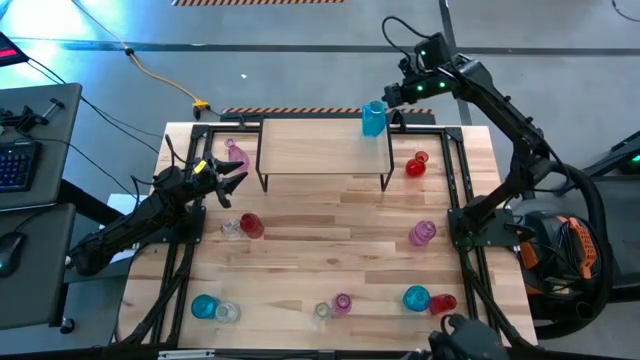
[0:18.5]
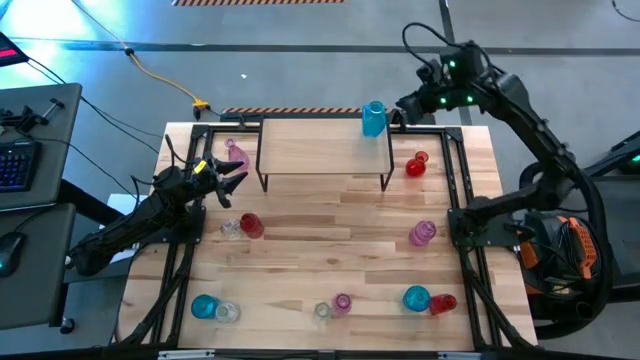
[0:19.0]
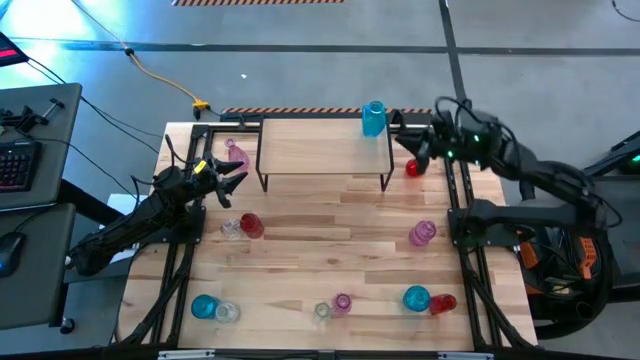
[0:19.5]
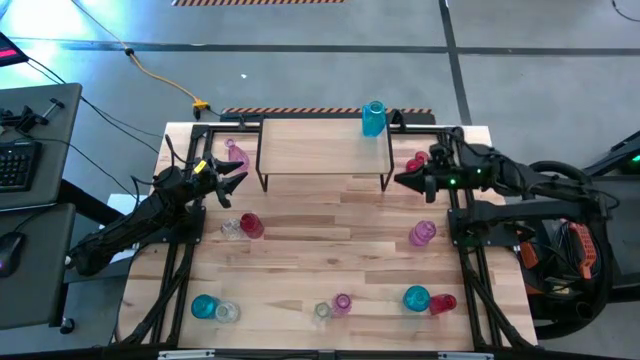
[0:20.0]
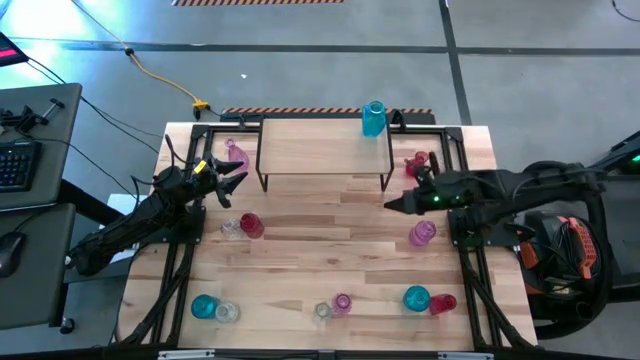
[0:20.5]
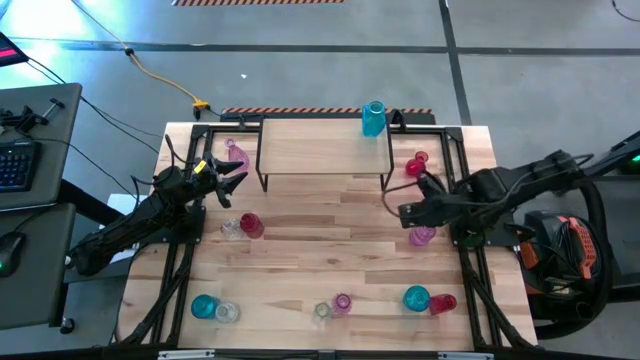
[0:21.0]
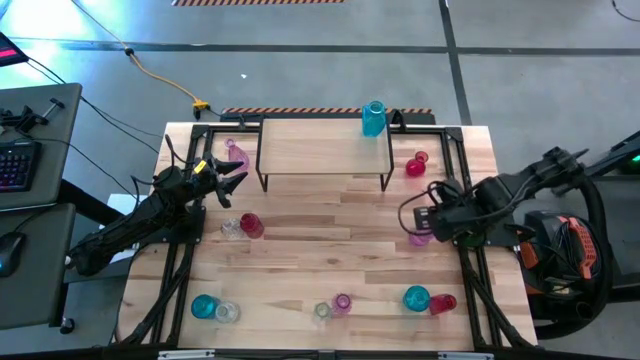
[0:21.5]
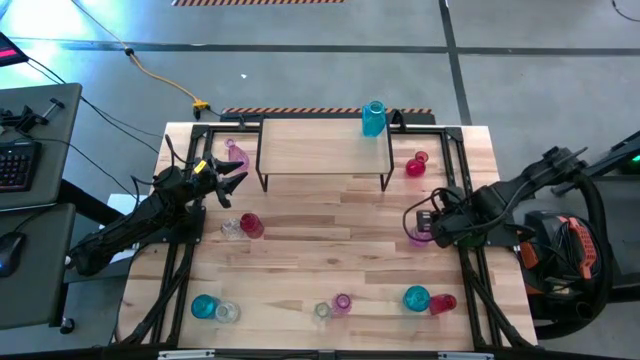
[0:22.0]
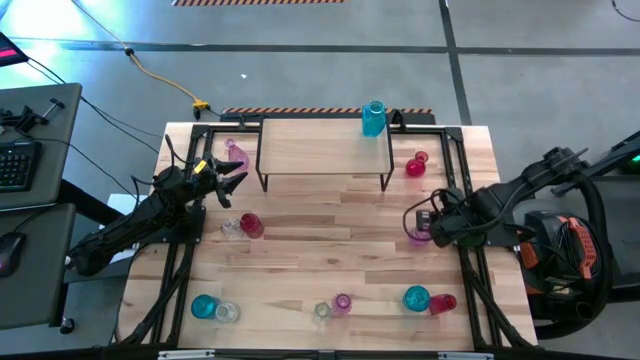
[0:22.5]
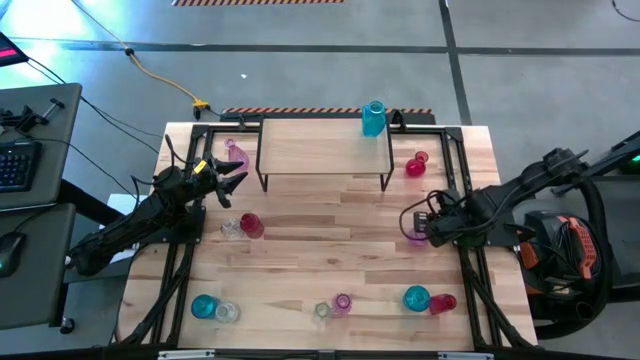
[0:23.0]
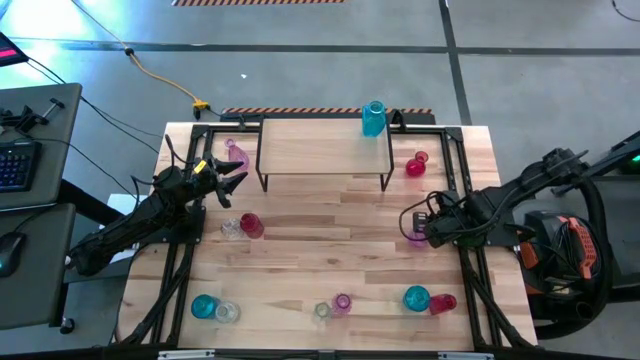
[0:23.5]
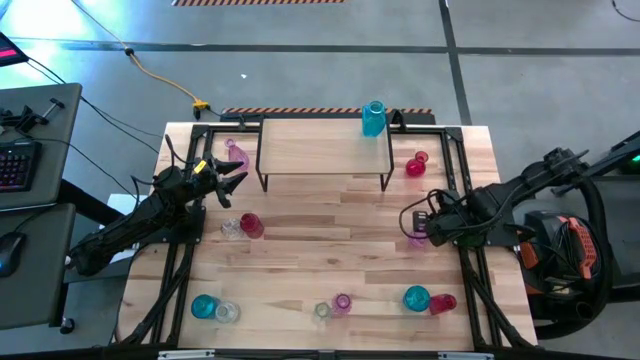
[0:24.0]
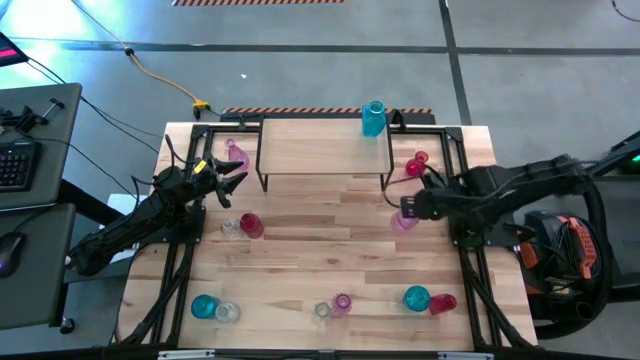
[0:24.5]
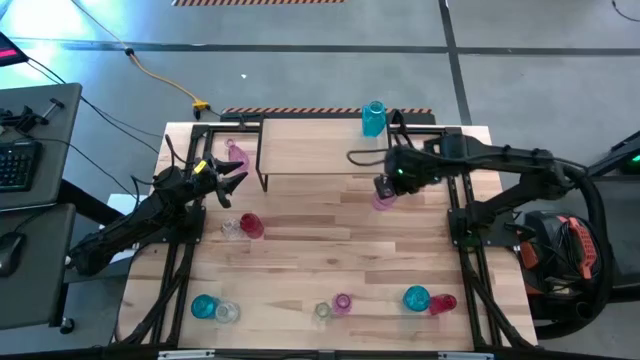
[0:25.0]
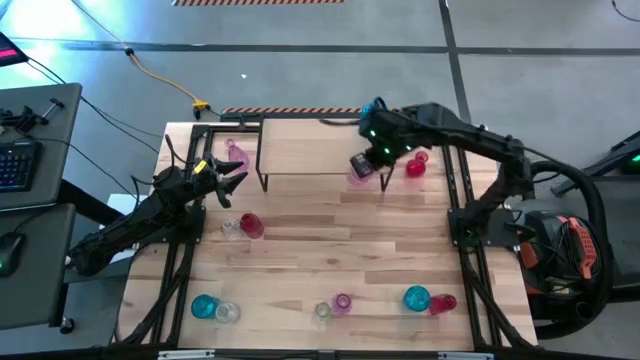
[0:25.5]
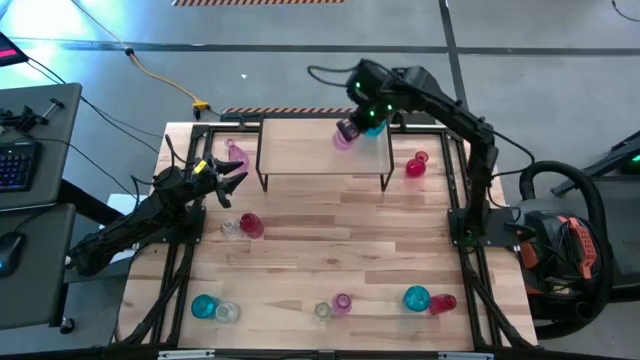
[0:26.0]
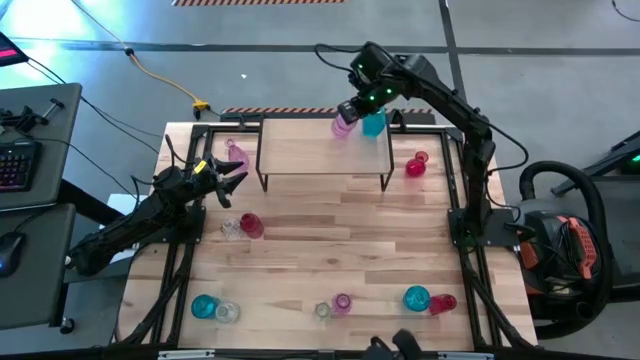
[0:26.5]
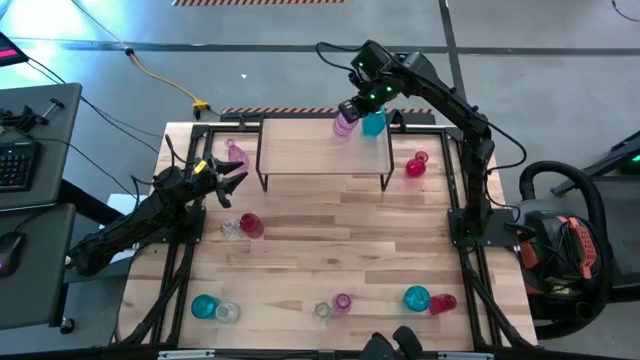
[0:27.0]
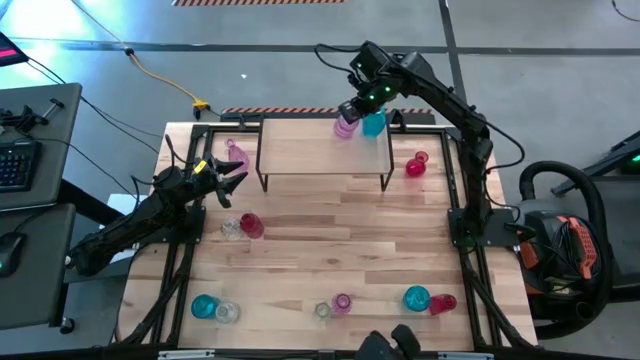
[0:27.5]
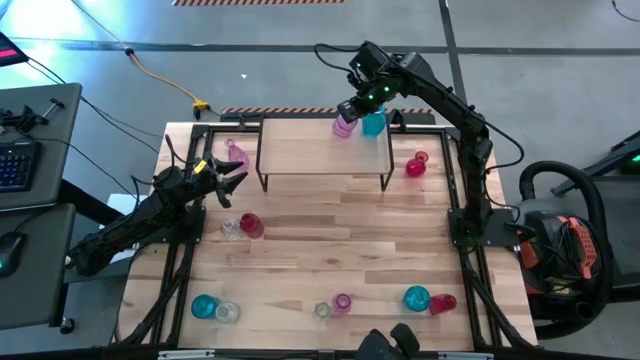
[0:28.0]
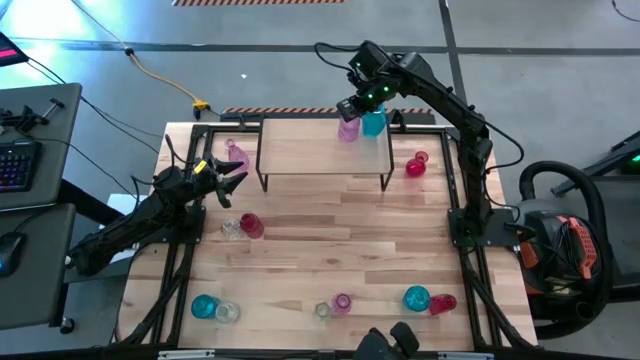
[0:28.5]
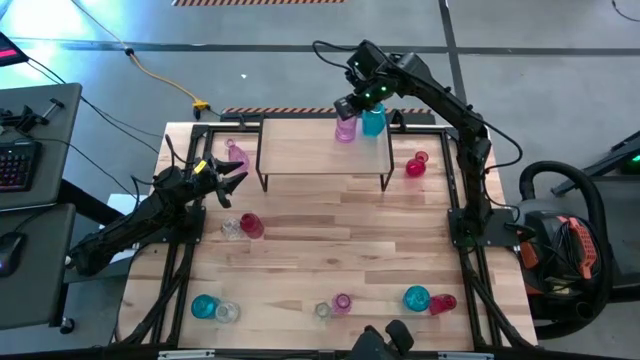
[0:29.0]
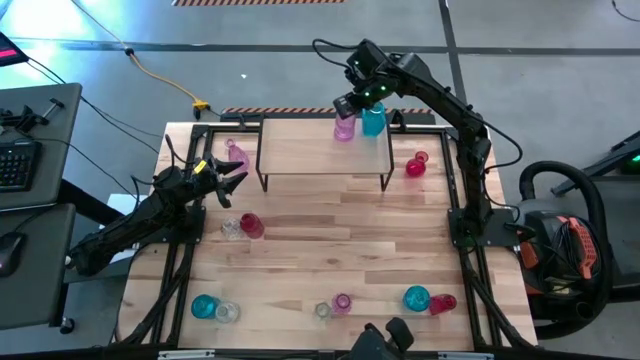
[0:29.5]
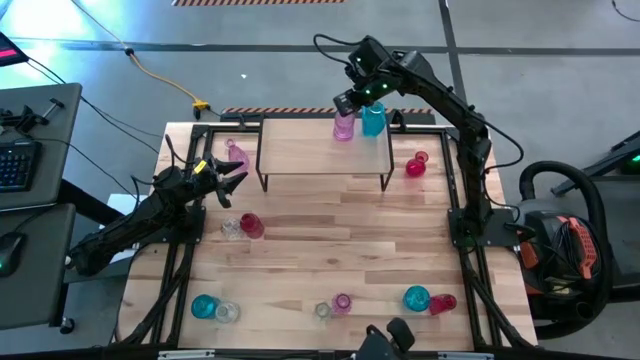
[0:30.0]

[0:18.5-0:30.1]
Task: sort vases onto shelf
Put the middle violet vase on the shelf

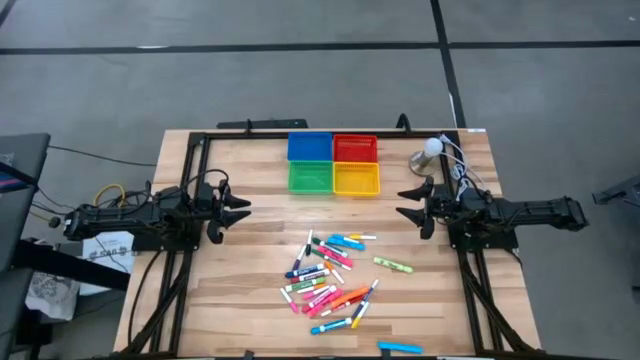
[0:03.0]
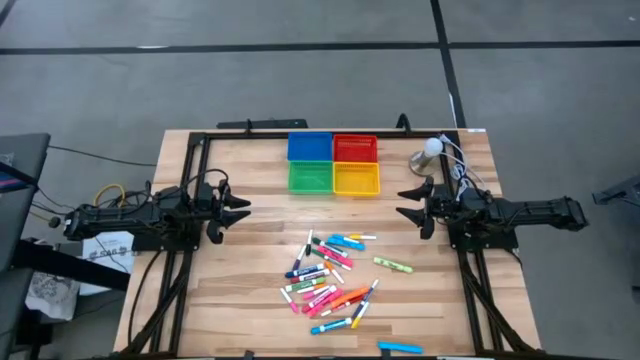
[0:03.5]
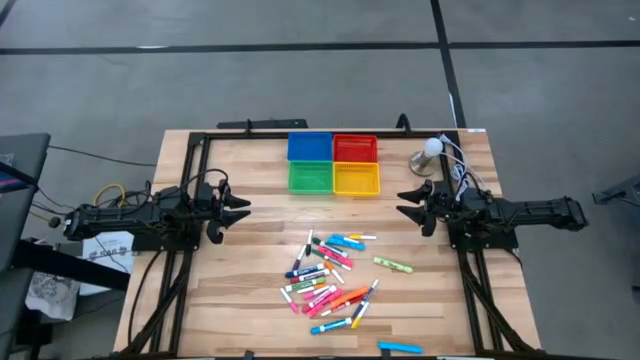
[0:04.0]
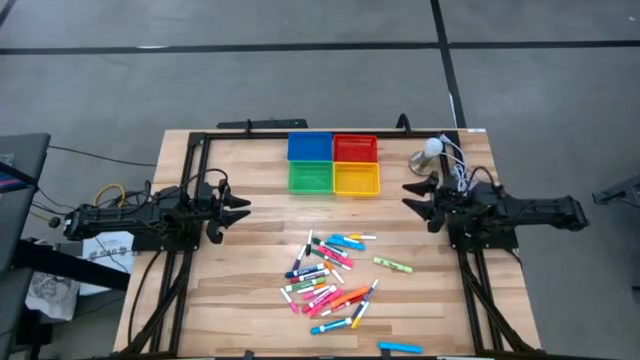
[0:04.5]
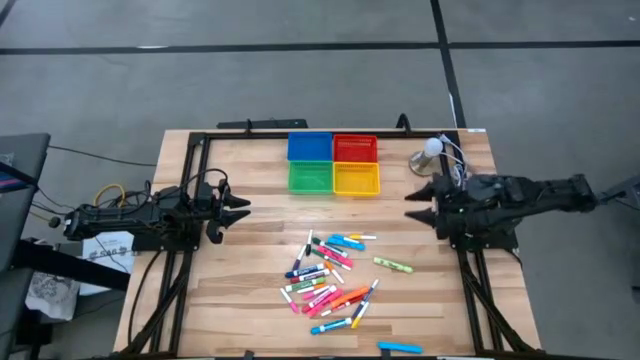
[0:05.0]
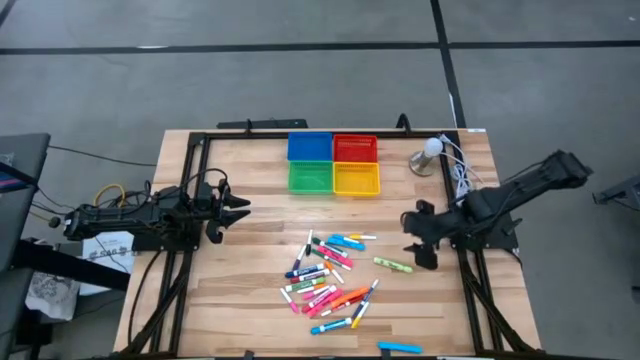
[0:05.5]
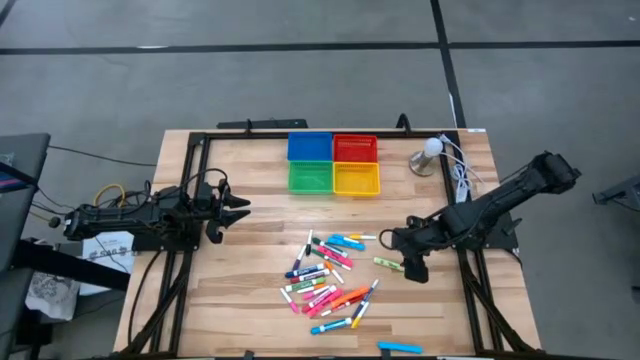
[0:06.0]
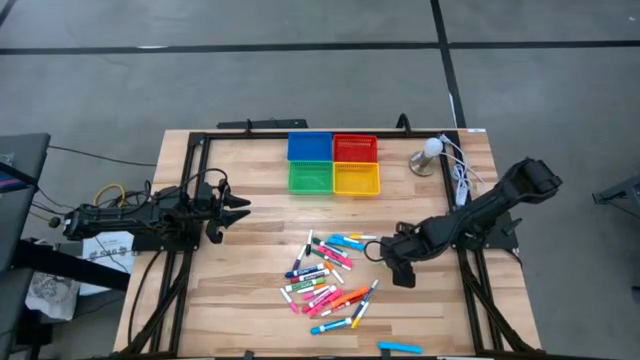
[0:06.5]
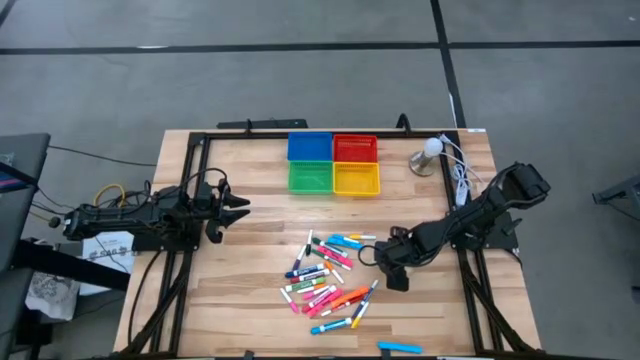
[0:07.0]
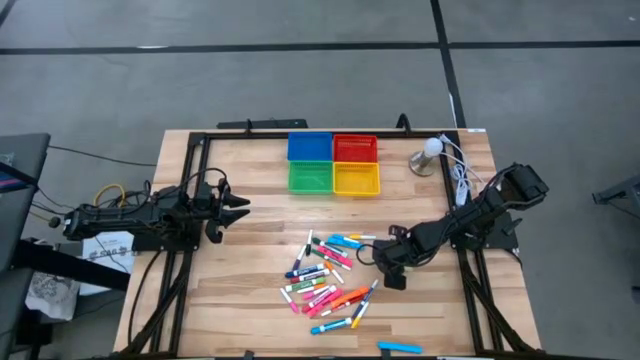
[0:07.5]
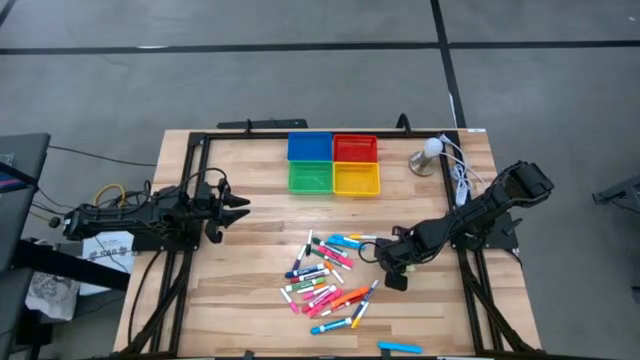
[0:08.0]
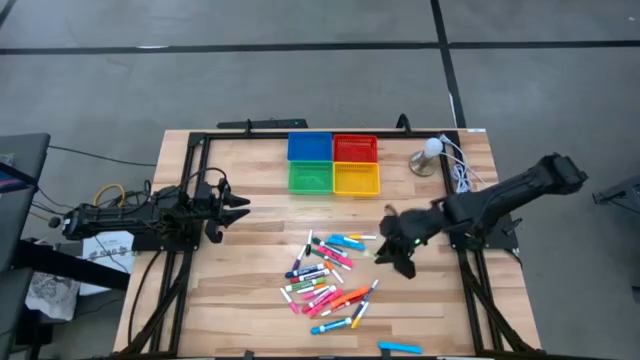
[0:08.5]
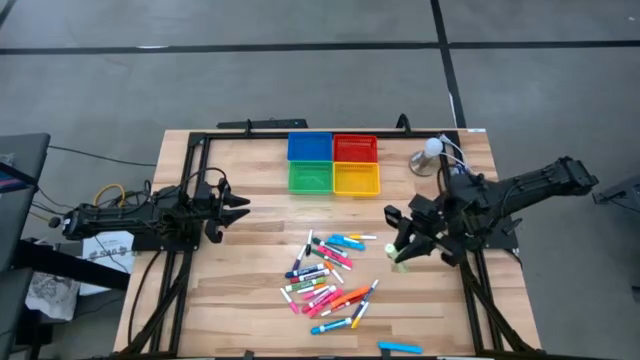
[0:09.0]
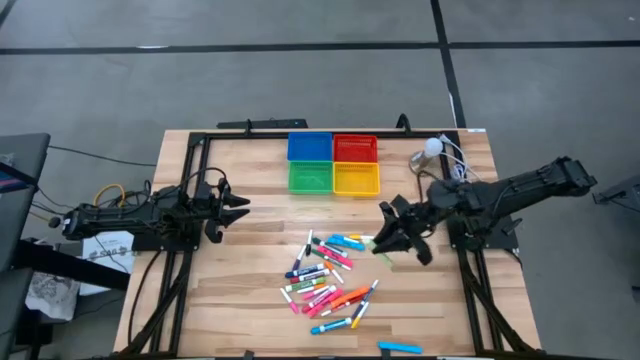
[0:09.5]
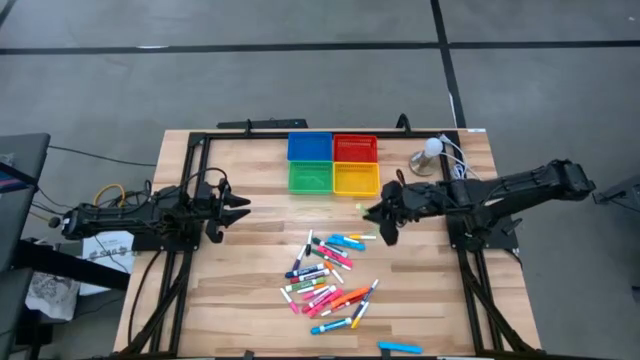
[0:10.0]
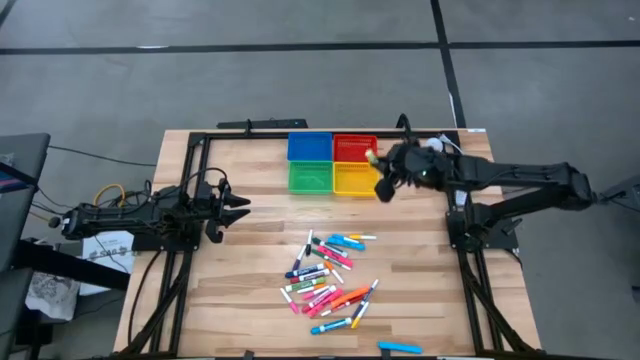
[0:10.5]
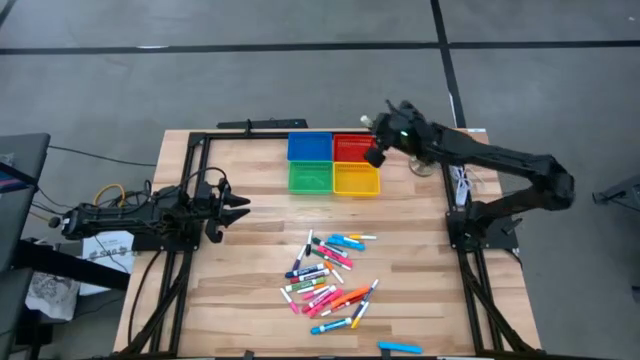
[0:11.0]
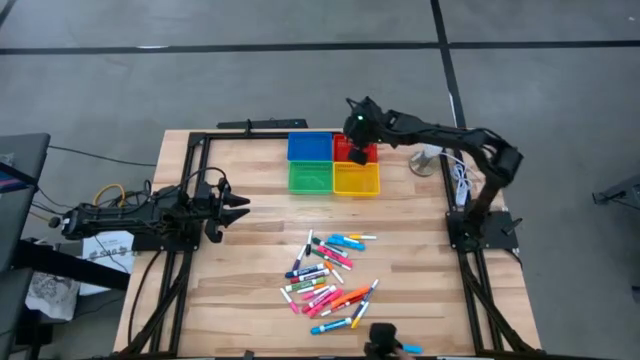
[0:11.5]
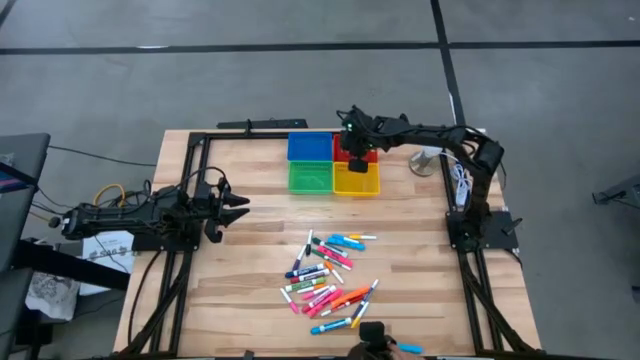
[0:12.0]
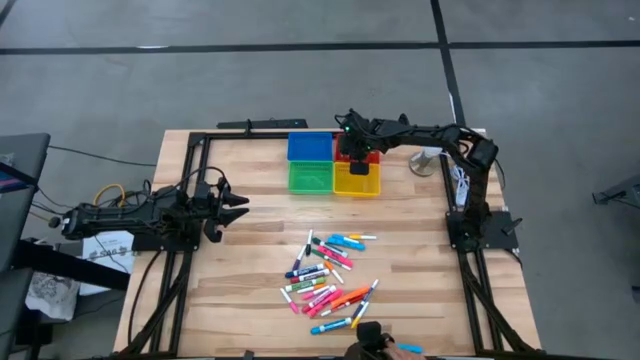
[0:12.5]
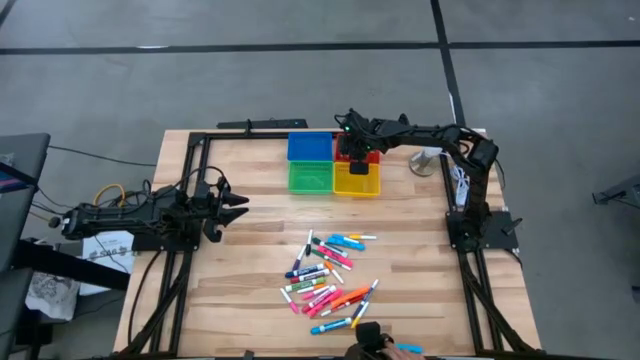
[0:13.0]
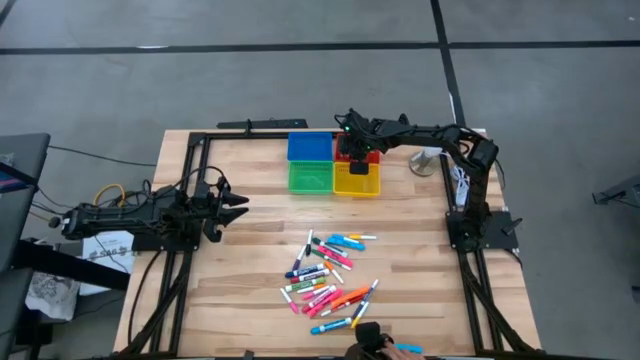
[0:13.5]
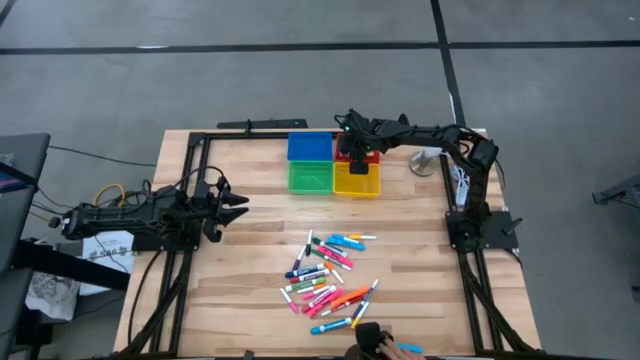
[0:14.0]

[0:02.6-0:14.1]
Task: Pick & Place Markers
Put the light green marker in the red bin
